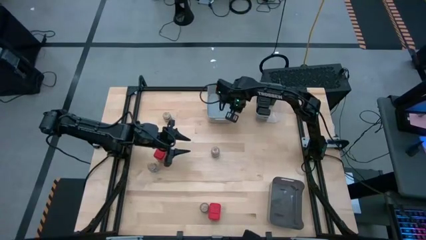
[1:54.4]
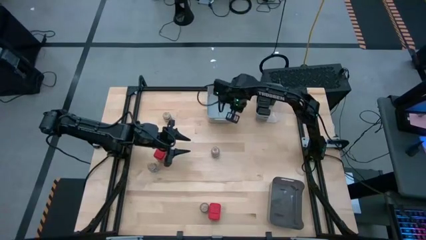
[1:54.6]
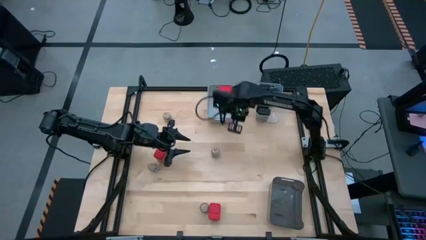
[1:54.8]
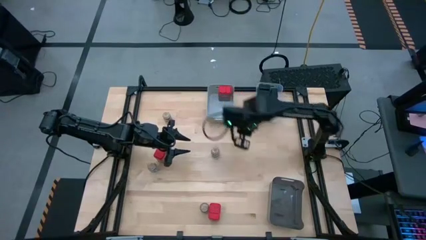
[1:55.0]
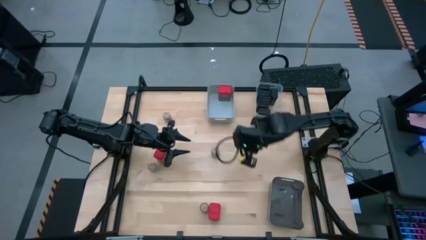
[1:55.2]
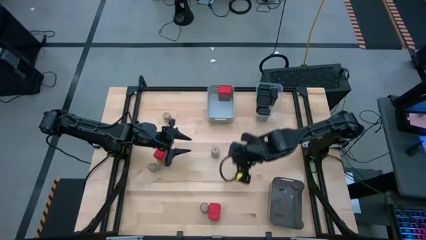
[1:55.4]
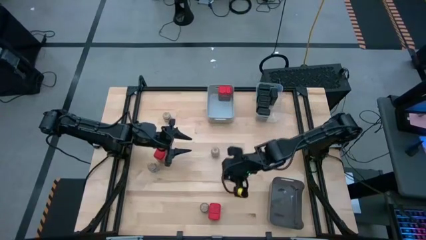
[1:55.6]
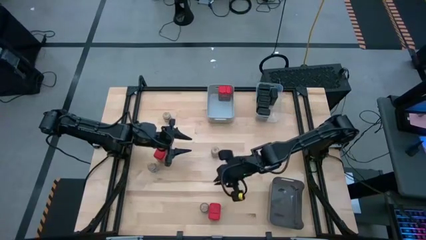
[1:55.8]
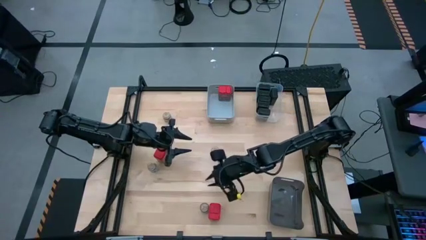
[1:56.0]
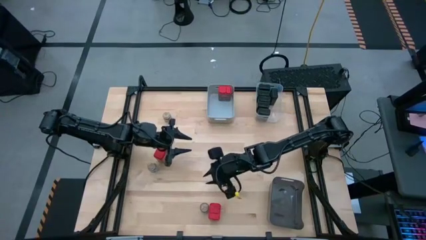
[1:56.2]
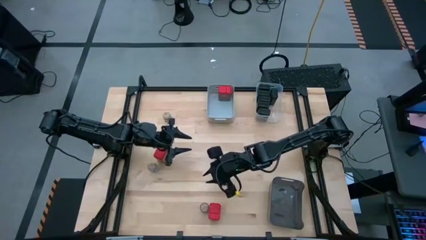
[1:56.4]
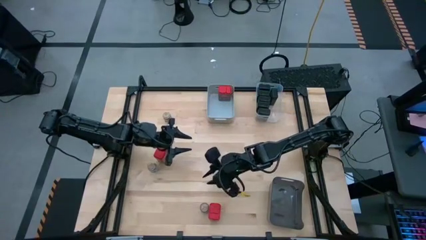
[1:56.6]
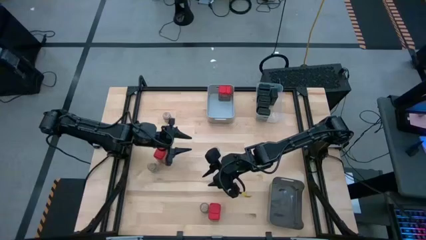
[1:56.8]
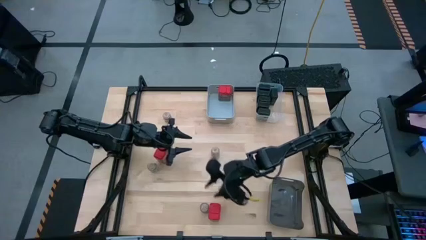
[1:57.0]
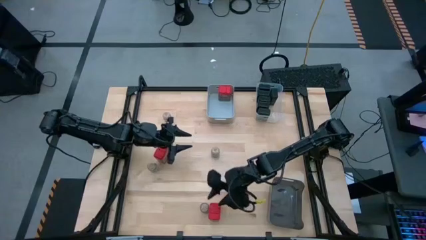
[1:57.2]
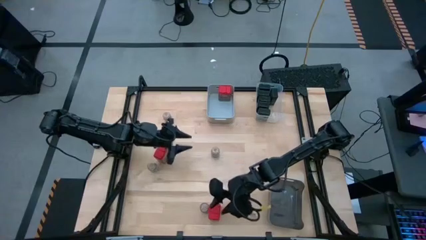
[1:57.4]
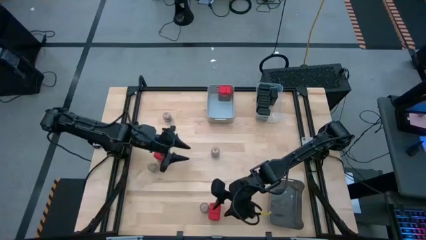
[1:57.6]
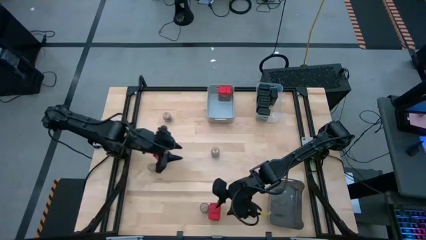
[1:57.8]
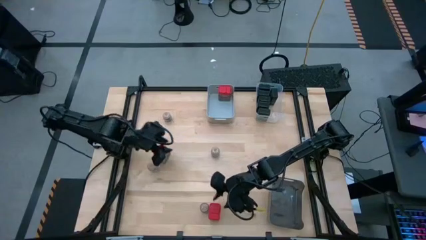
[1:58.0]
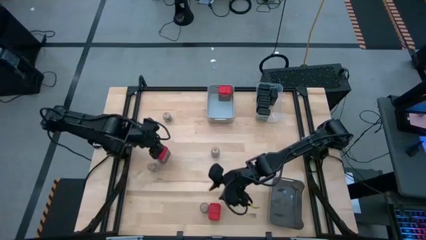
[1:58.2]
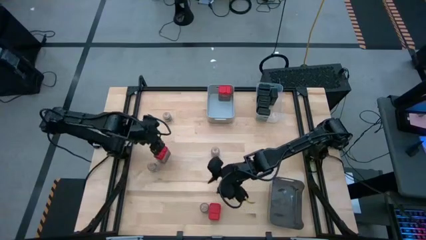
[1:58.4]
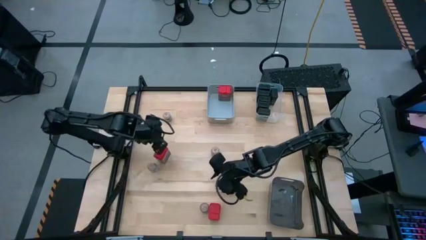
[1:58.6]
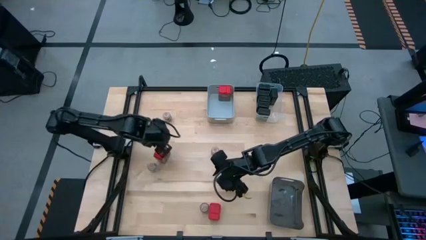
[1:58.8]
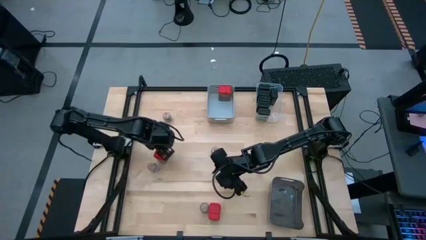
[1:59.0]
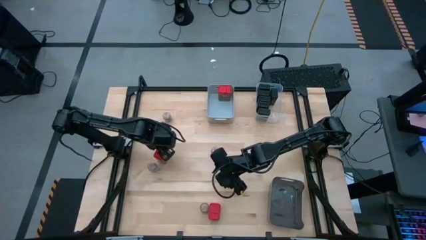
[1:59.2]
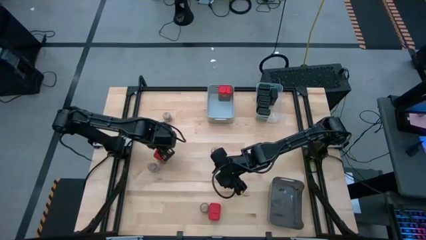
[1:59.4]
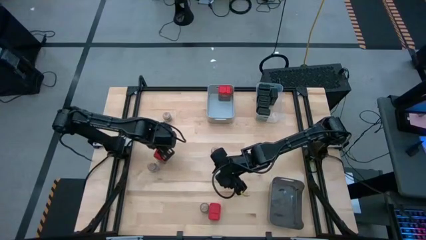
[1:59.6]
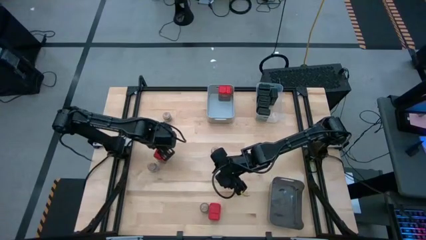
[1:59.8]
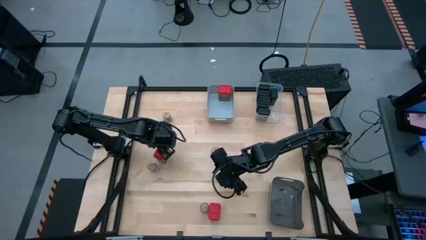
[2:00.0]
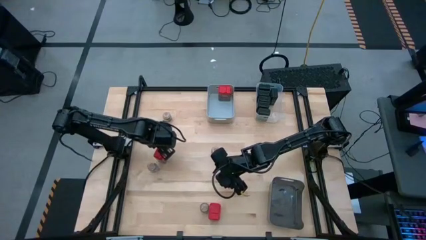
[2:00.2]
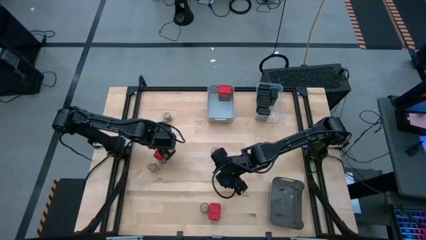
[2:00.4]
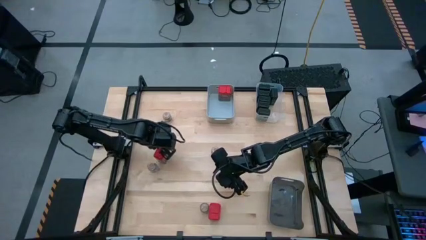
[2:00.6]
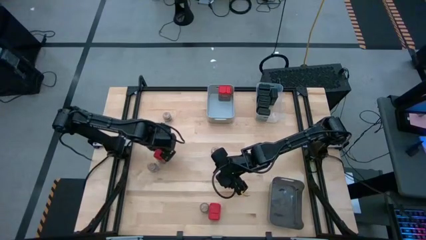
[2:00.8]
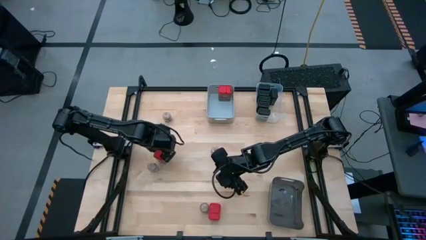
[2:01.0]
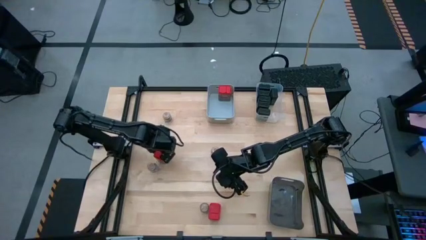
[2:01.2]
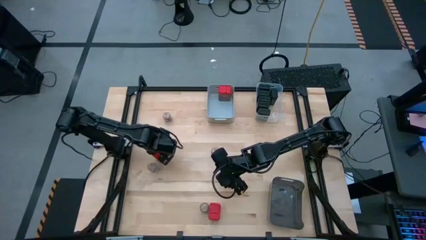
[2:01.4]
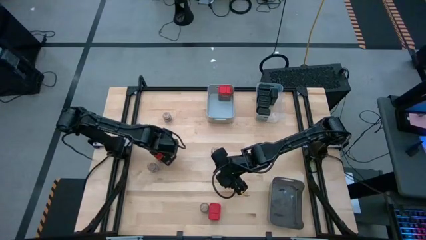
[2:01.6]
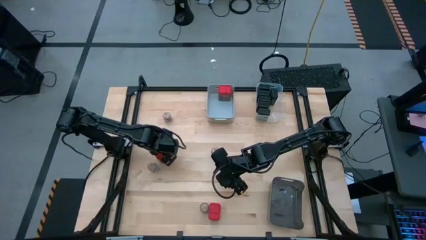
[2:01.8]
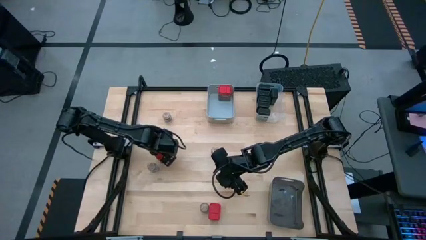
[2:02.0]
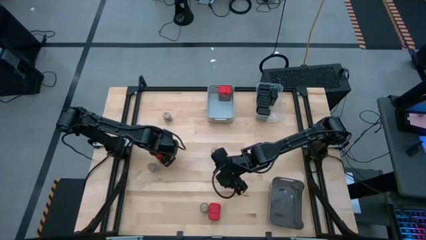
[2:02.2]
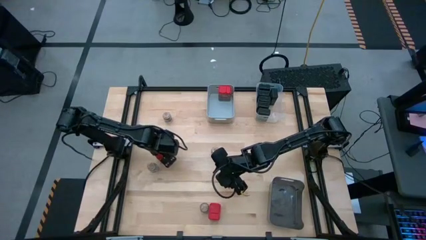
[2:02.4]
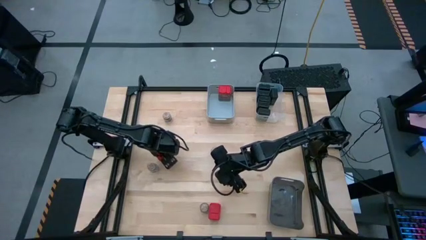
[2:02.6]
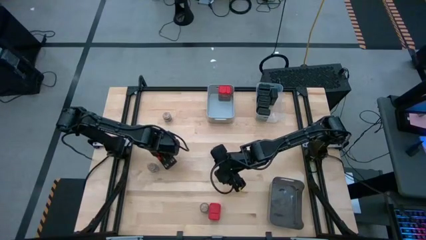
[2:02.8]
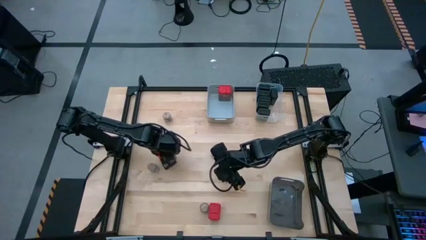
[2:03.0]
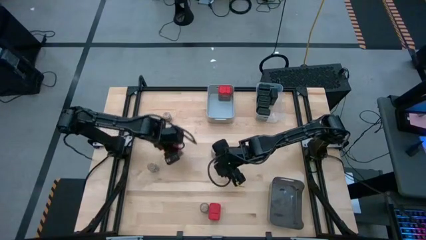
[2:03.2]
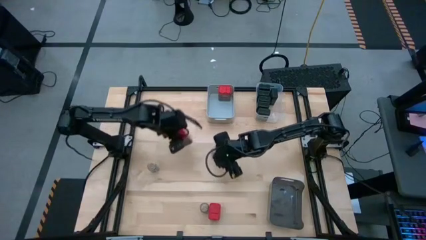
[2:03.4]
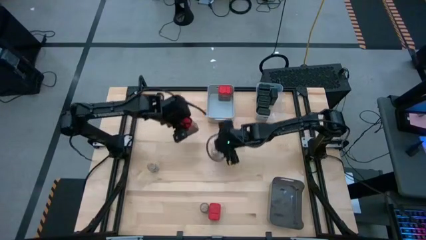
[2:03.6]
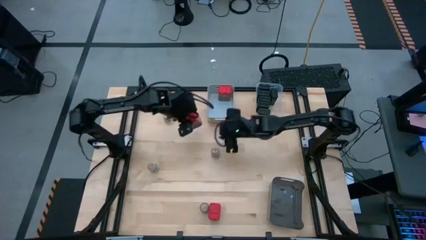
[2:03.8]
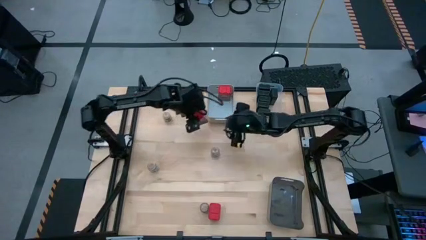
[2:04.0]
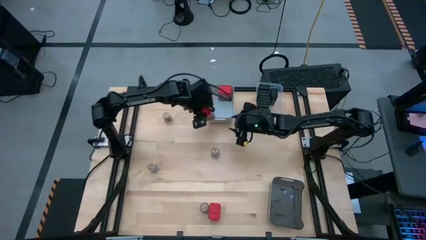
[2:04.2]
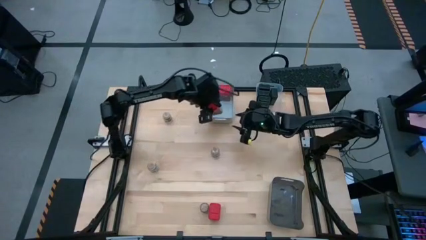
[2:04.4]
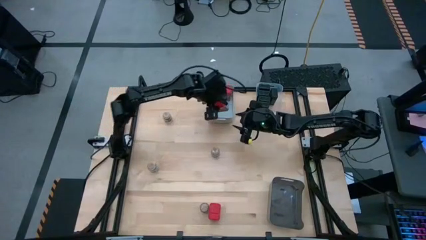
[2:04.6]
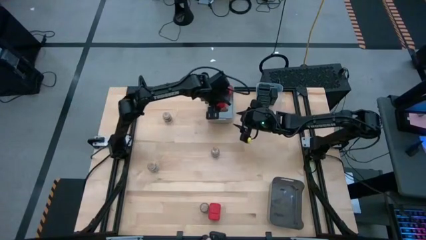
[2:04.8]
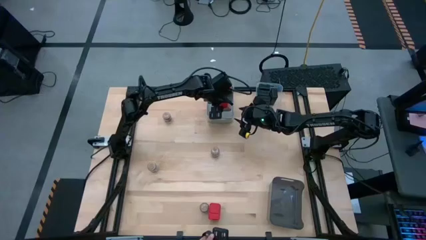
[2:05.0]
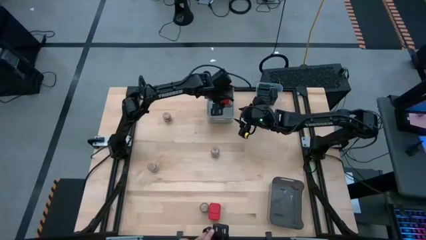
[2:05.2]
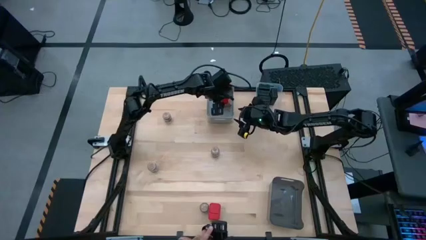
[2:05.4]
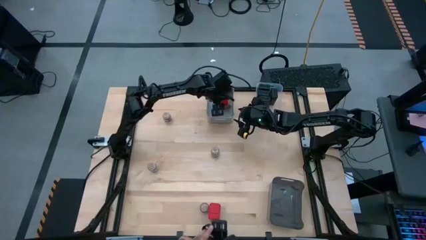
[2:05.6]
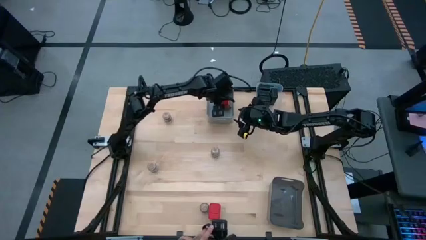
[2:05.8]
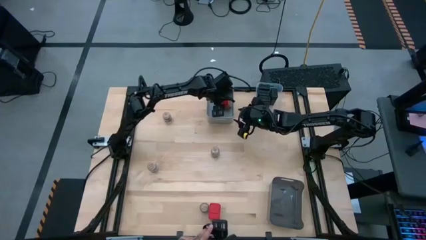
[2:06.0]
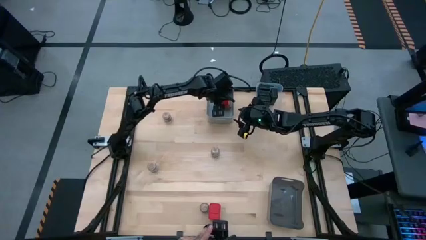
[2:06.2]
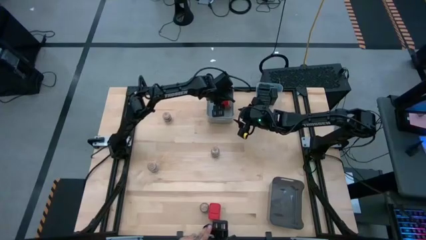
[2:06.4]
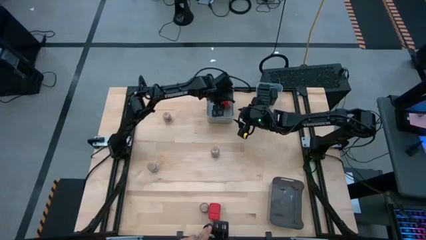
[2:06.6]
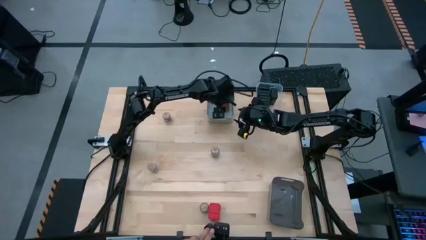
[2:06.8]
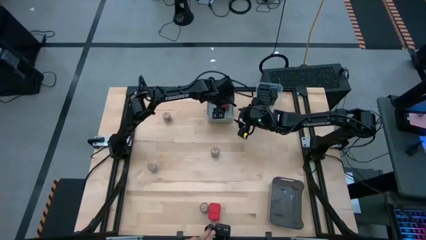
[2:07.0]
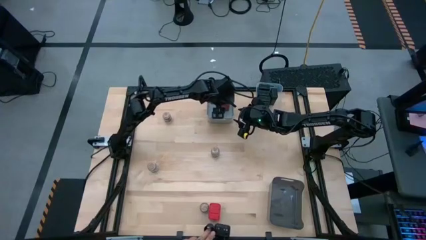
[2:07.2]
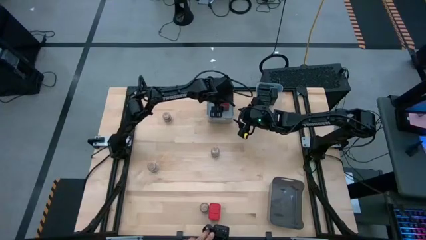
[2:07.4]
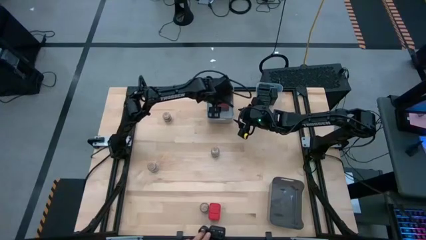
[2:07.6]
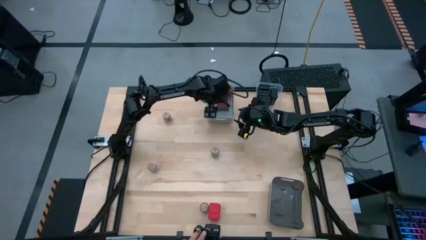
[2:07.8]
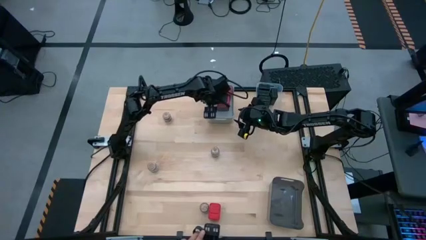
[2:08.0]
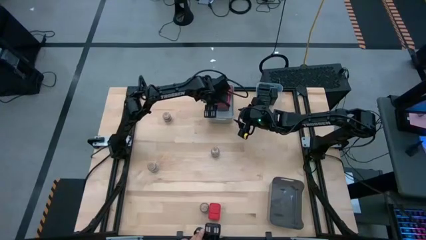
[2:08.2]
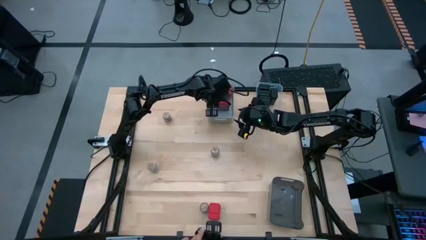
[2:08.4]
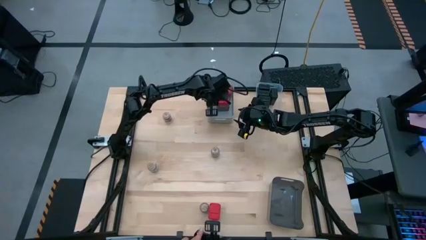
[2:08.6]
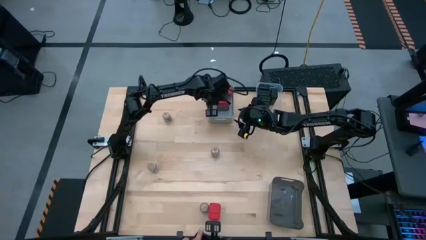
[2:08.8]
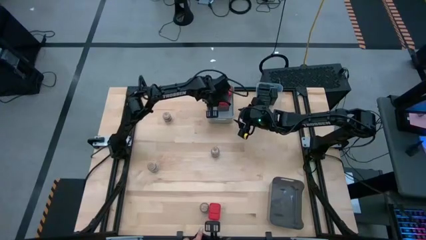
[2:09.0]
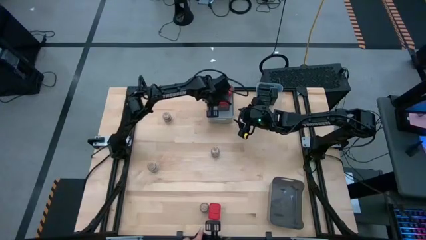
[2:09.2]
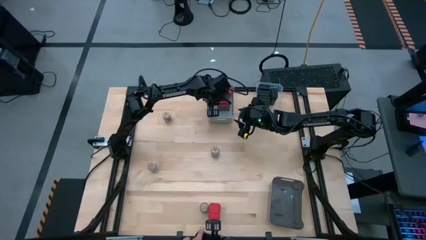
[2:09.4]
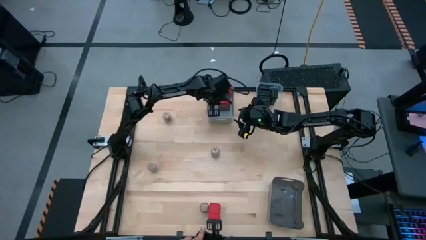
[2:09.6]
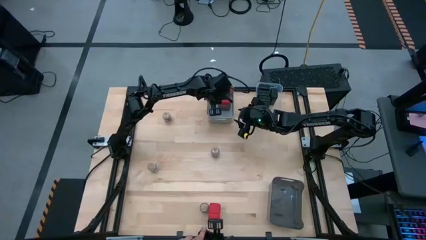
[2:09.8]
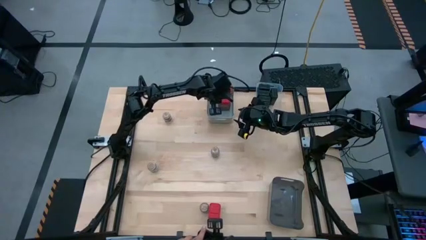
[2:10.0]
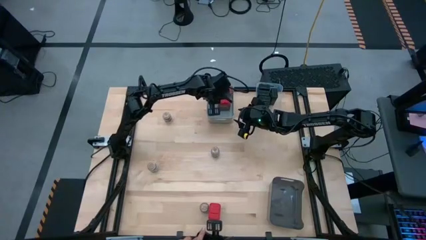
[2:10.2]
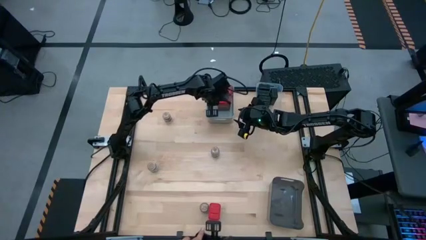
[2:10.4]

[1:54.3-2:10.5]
Task: Sort spices by type
Put the red seasoning can into the gray bin
